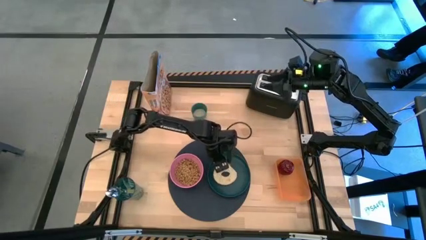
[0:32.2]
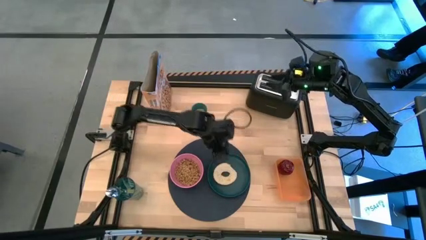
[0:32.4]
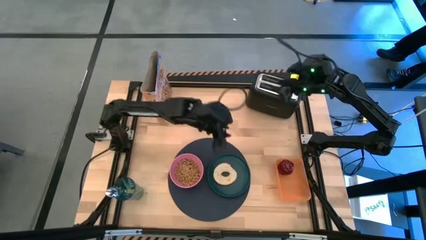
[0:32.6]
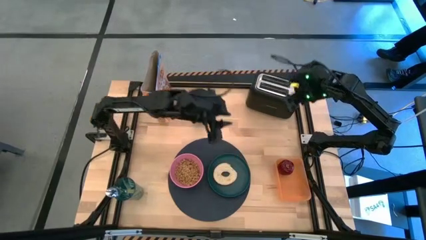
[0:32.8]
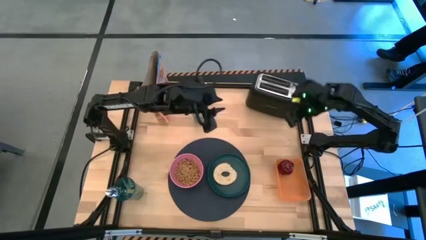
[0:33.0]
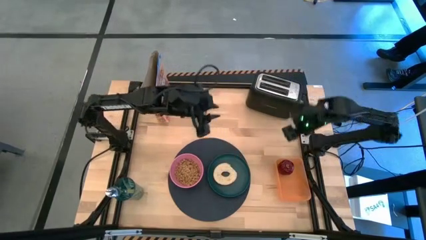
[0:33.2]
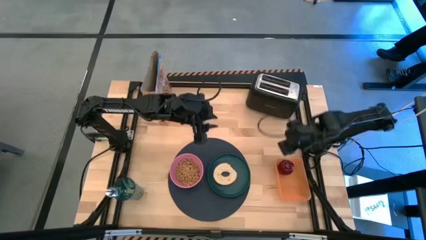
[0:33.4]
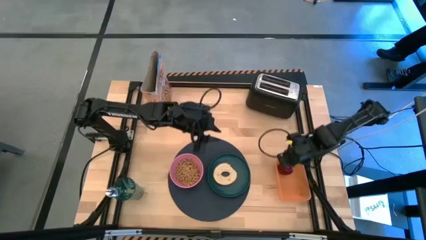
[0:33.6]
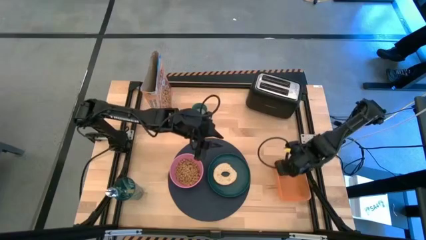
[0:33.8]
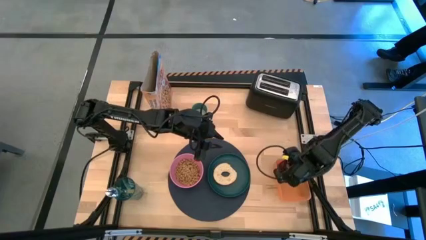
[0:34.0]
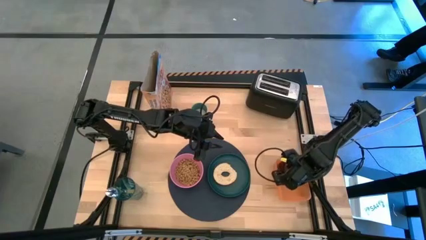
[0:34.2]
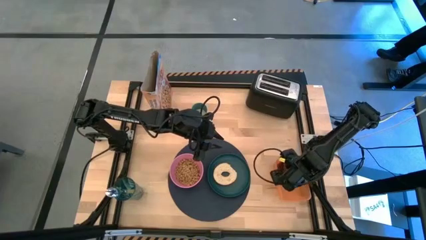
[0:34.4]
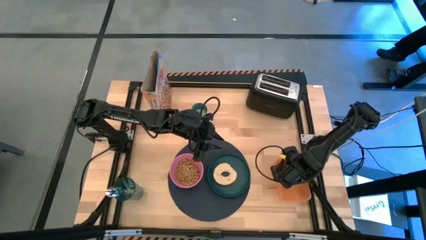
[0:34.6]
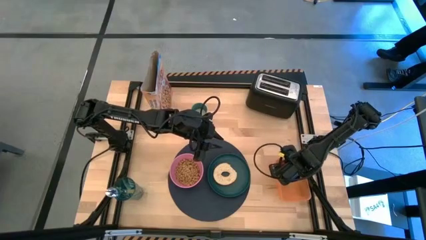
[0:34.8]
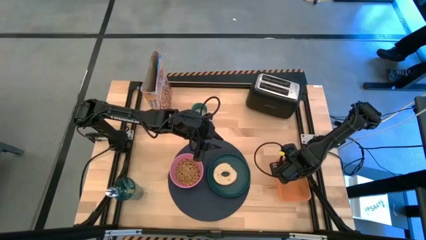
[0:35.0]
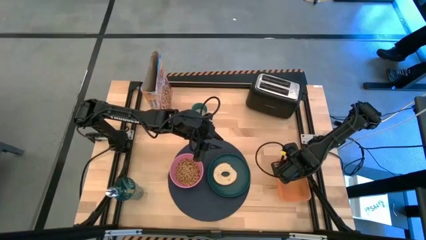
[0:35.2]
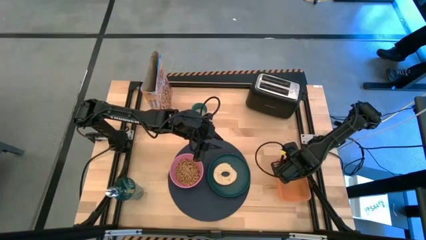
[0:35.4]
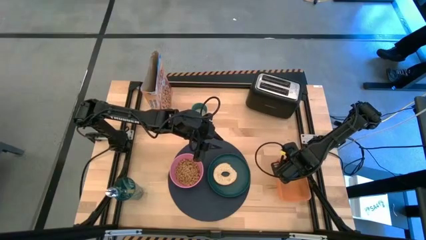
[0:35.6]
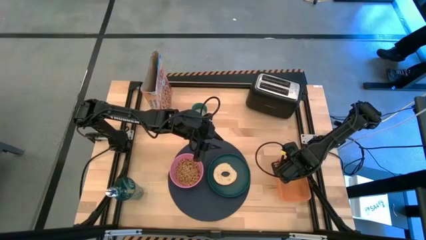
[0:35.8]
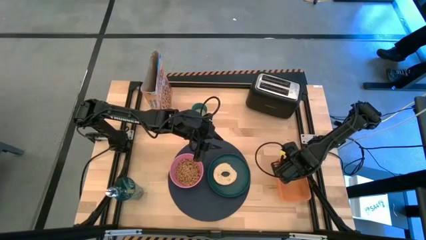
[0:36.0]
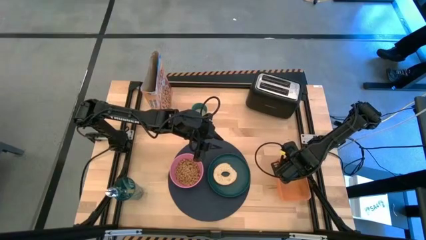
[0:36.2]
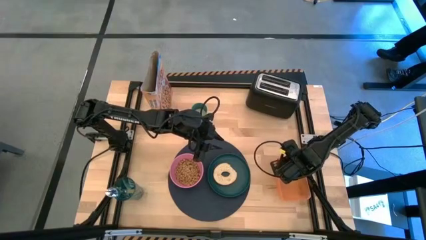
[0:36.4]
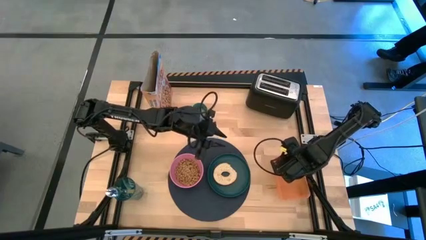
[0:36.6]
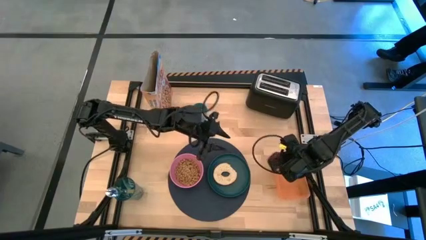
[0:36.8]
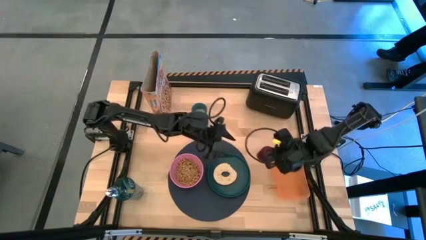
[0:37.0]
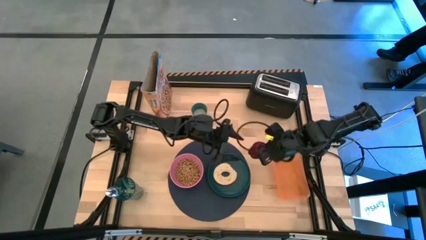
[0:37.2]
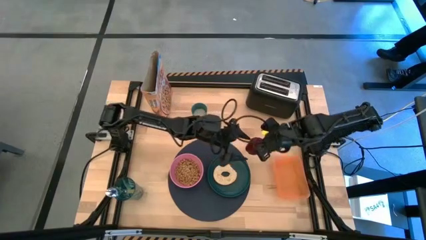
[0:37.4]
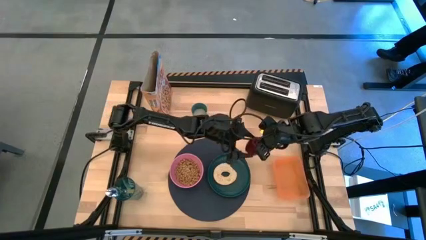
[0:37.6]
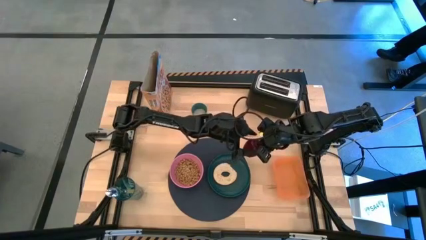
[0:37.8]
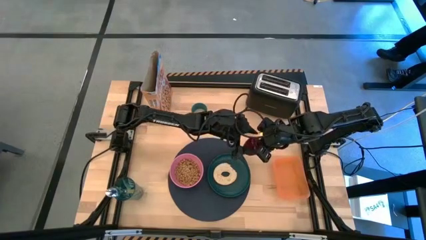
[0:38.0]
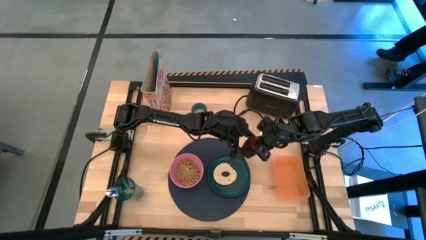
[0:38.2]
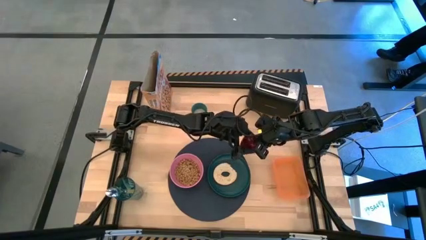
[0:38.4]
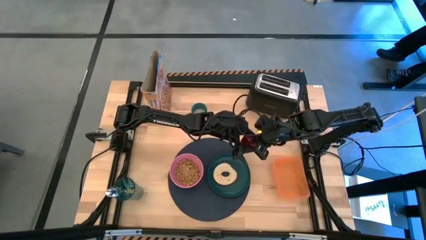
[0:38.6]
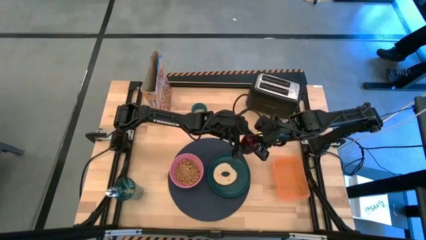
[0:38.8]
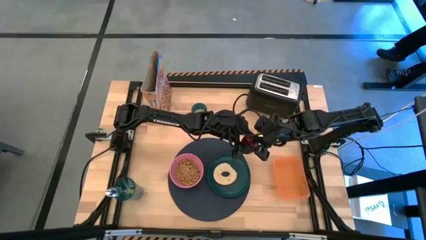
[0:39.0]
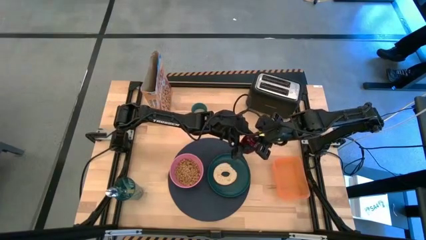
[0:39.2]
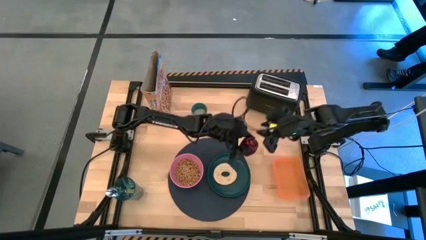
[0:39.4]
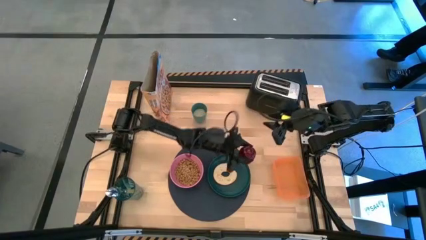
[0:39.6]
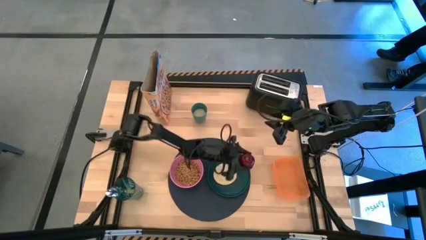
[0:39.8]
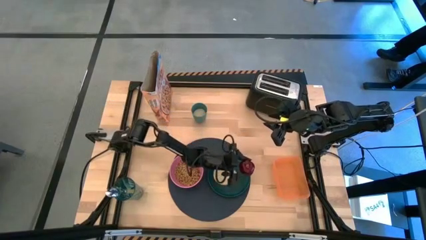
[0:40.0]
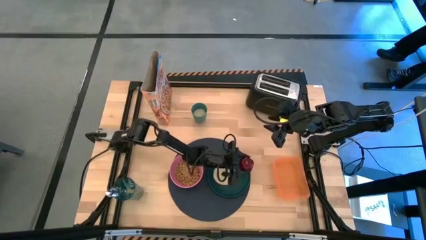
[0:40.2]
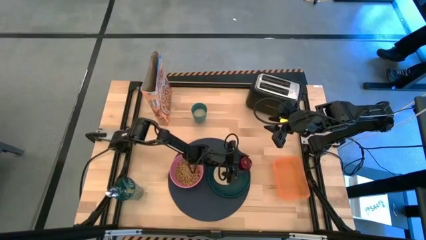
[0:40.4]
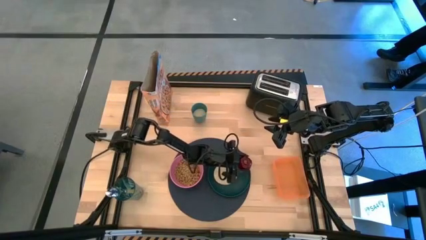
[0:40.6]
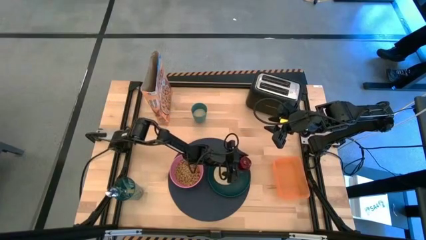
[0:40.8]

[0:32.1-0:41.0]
Task: Arrange a breakfast setting
Put the apple on the dark green plate beside the toasted bread

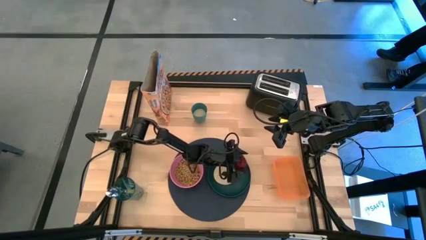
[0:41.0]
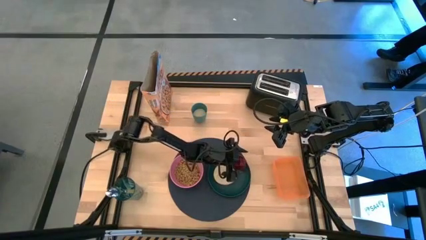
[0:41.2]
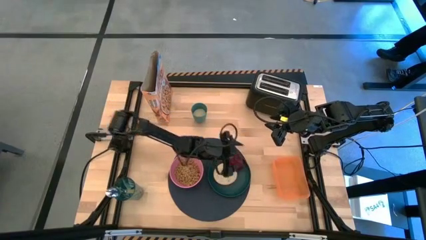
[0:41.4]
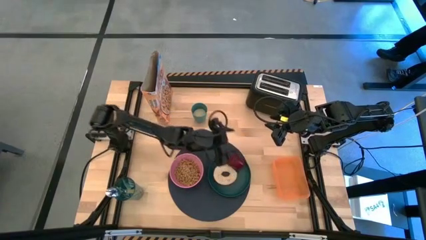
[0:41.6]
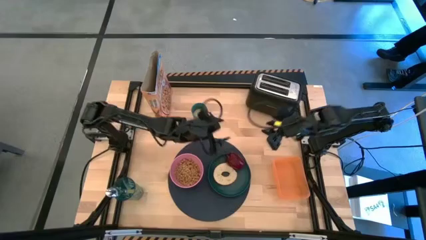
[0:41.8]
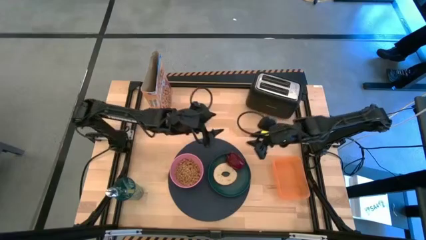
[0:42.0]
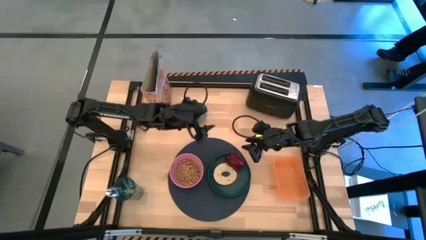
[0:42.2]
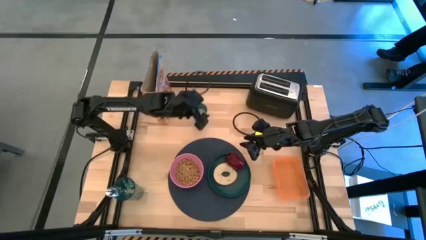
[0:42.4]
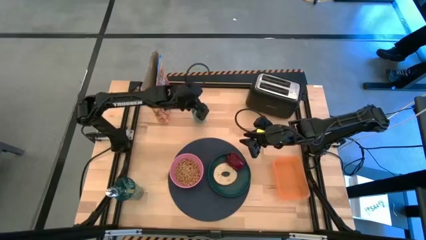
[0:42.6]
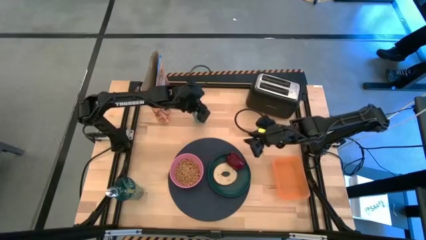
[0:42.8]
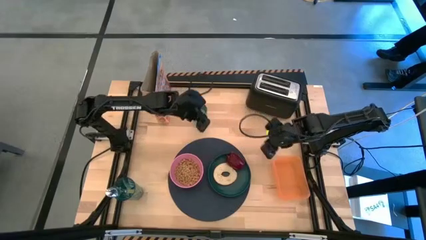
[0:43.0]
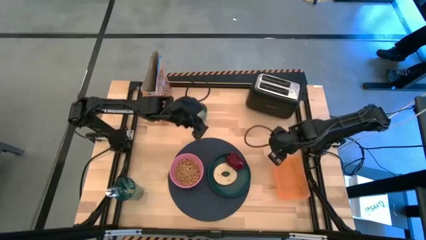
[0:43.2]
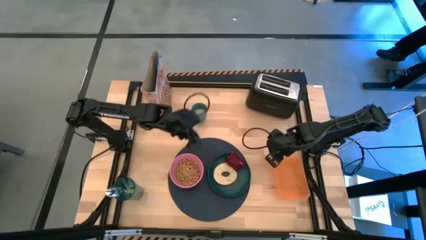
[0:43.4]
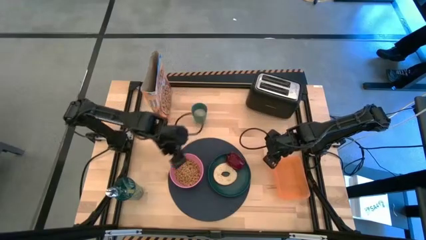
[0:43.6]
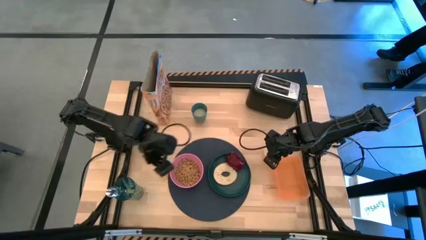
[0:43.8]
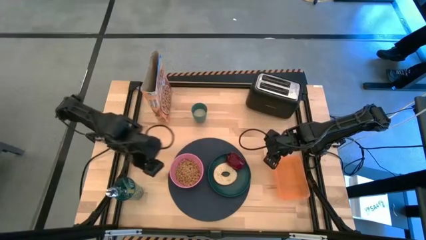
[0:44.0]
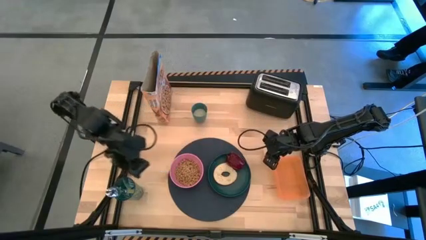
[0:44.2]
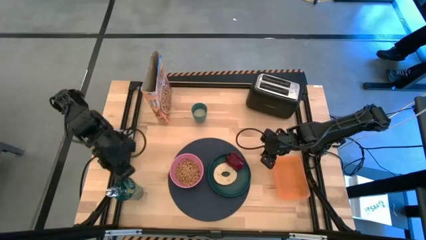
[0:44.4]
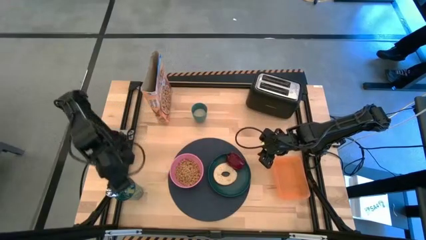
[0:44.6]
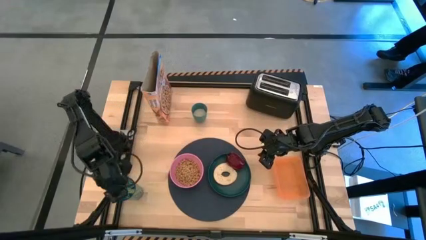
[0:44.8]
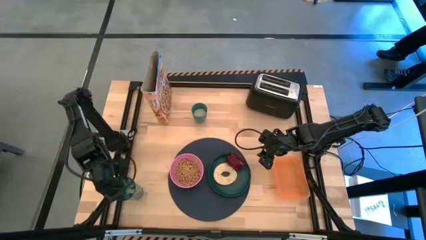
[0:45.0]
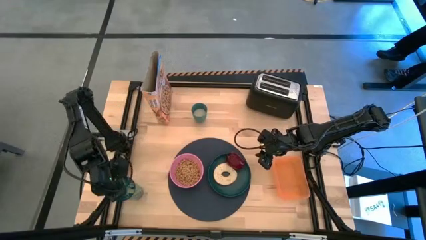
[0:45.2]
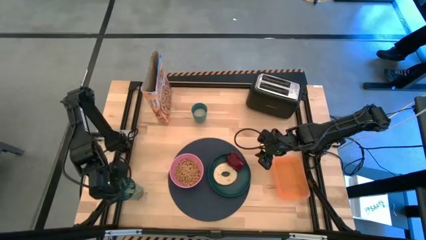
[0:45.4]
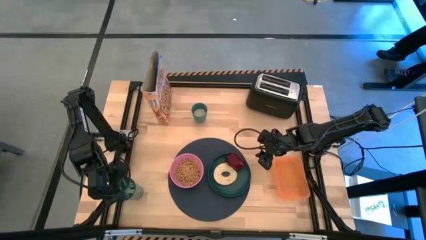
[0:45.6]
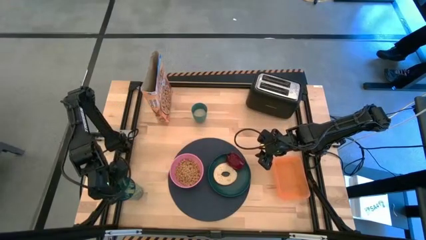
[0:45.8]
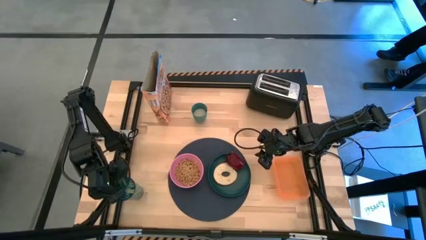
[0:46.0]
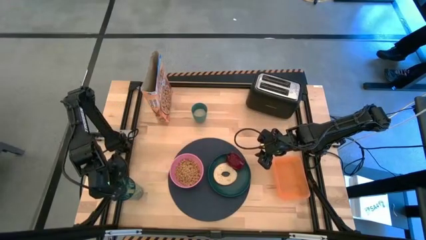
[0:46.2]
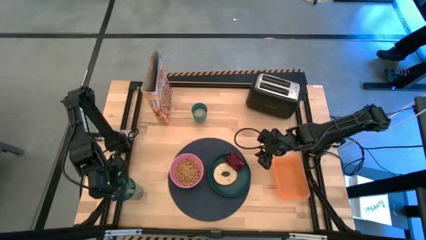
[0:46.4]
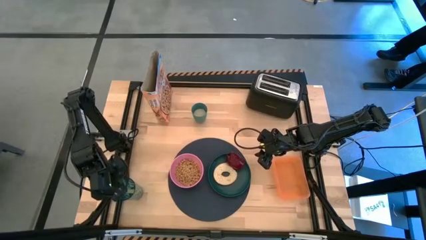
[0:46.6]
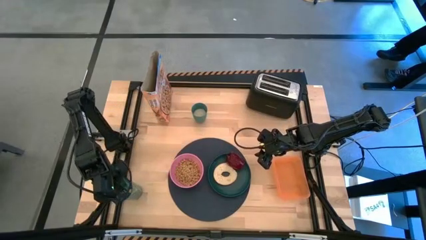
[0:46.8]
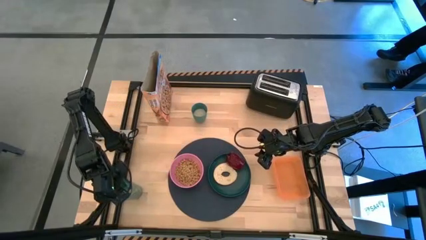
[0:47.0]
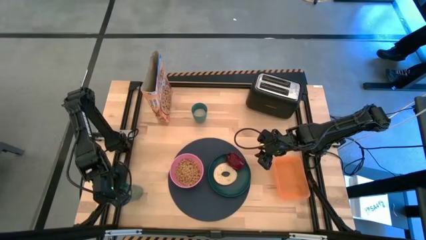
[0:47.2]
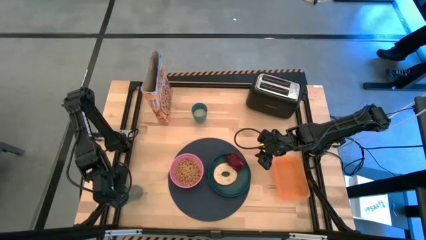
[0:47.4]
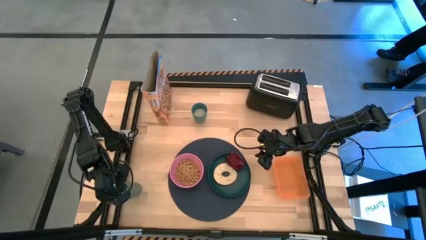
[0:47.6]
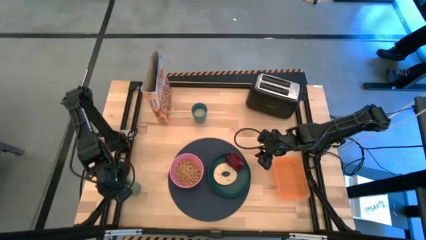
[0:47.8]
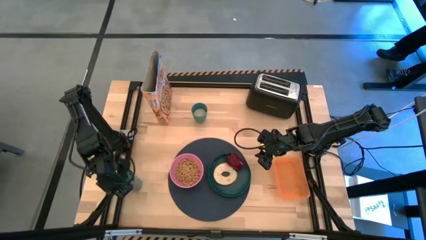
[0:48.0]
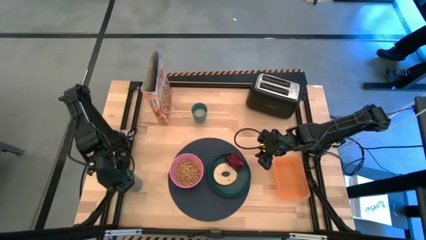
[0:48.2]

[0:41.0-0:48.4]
Put the yellow spoon on the left side of the blue placemat
